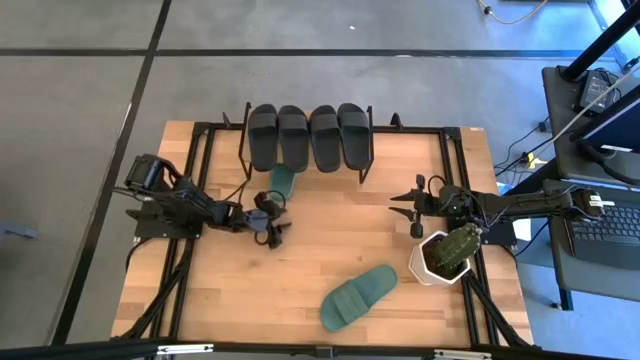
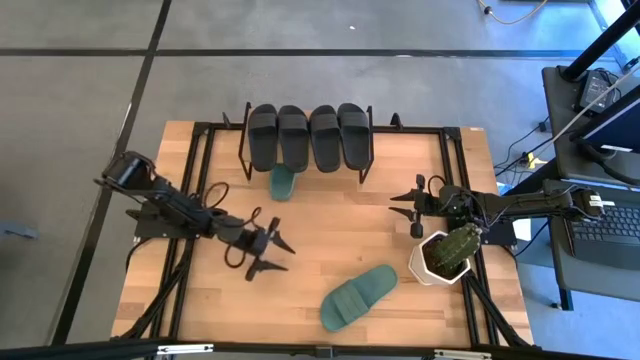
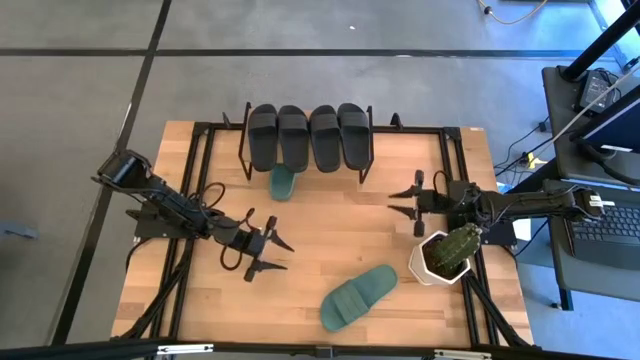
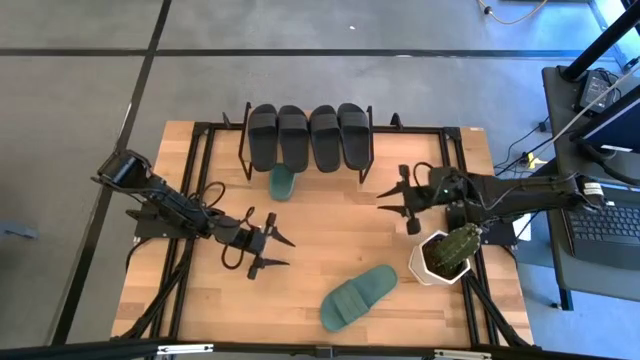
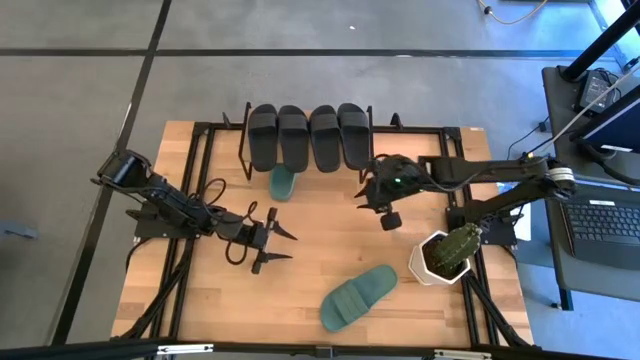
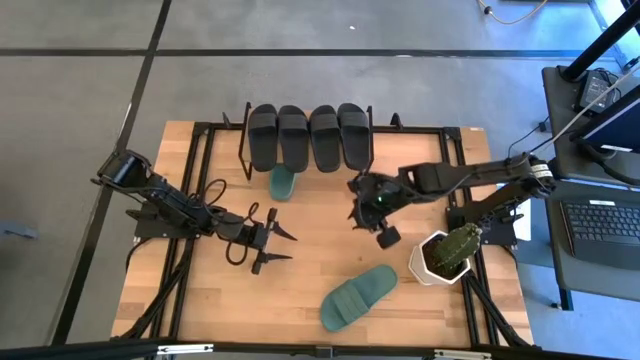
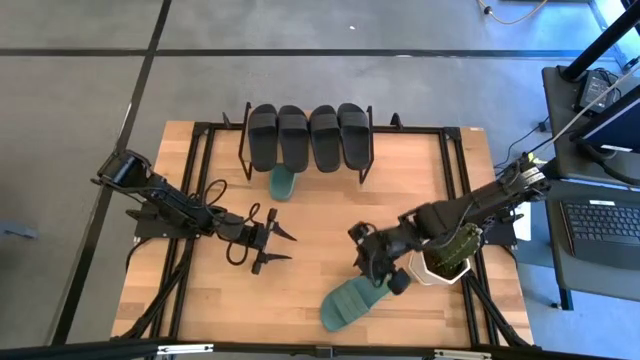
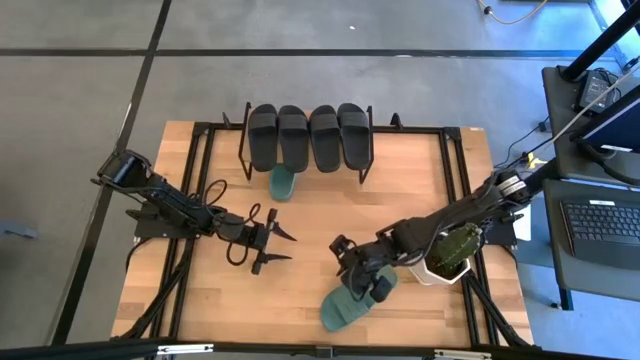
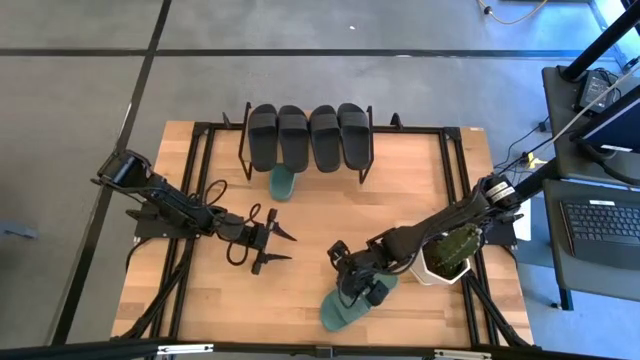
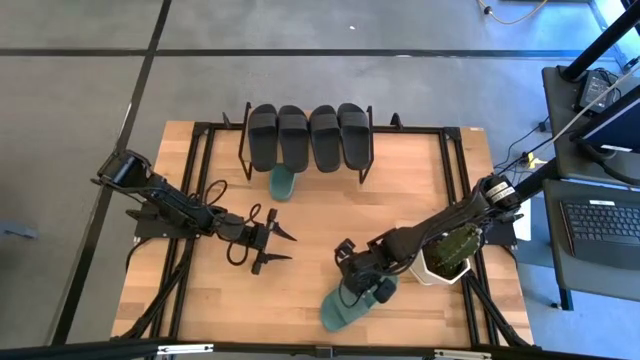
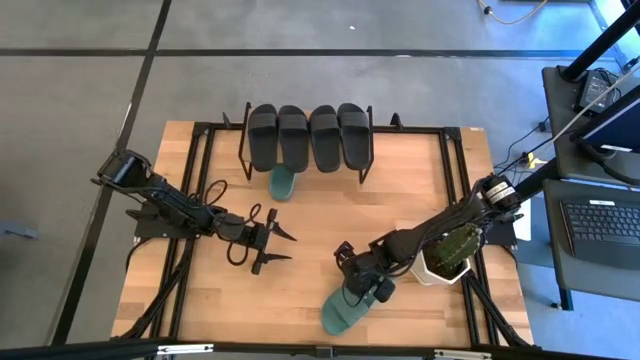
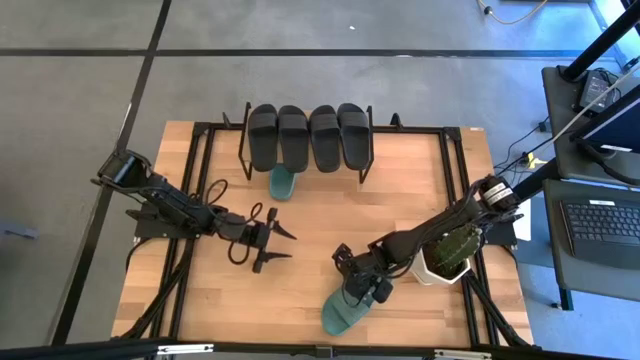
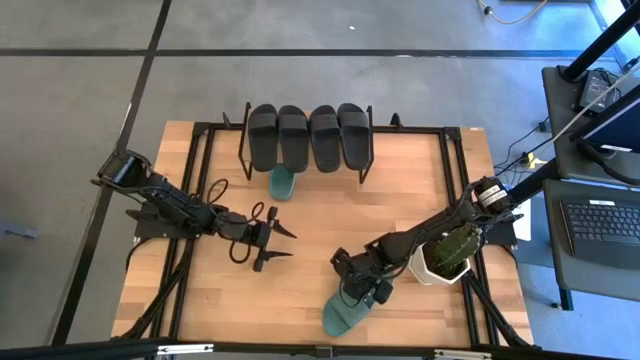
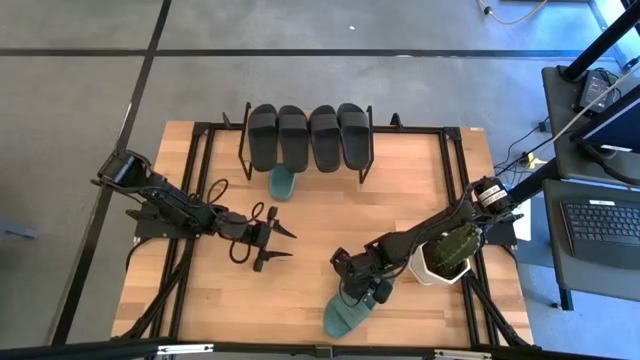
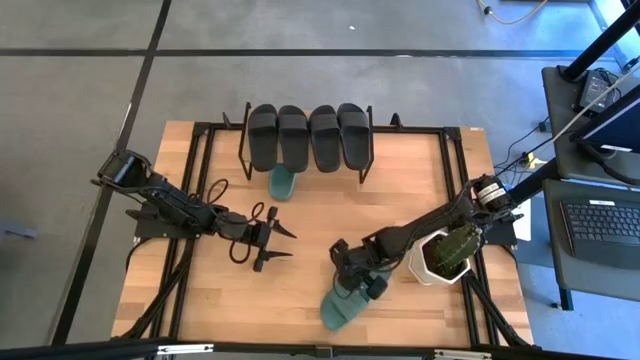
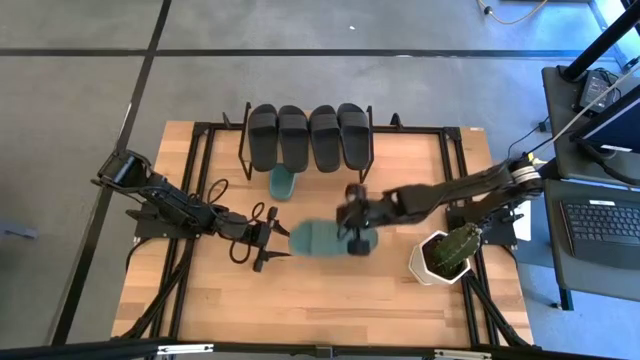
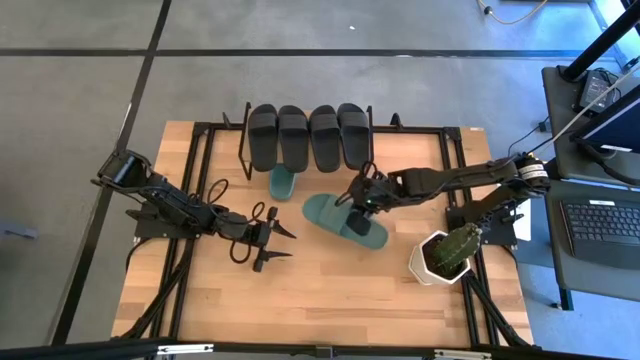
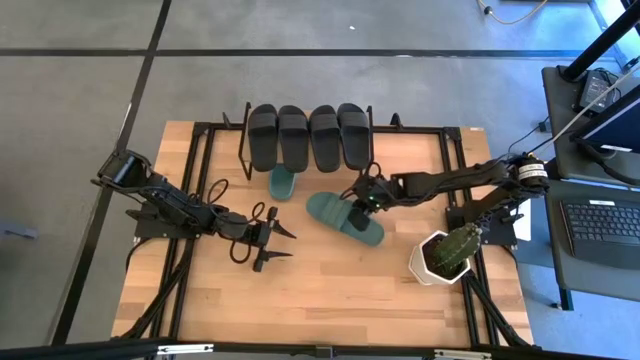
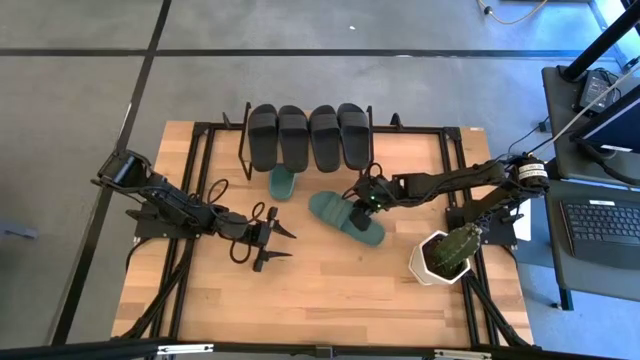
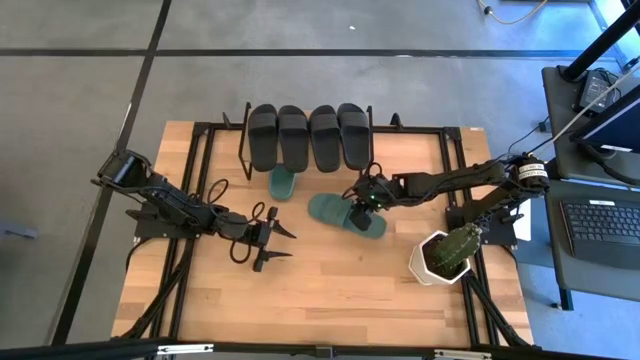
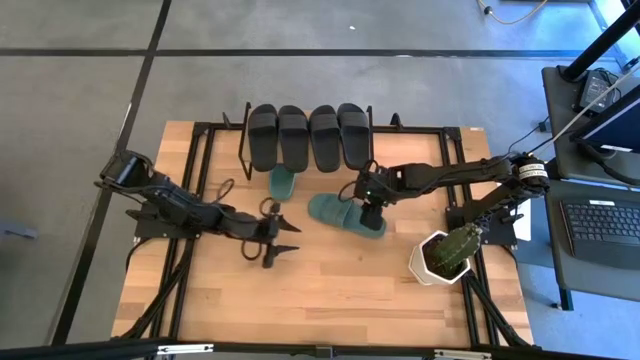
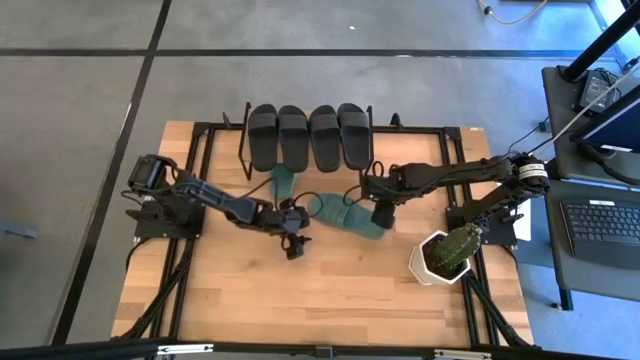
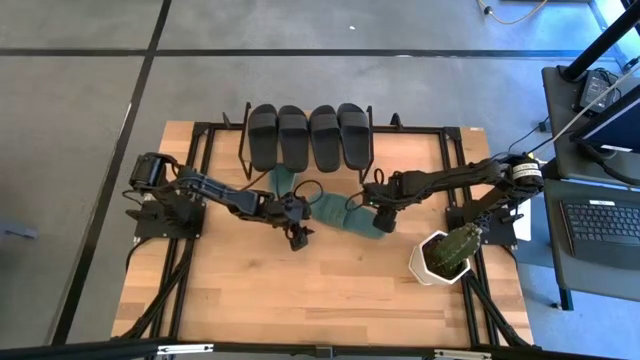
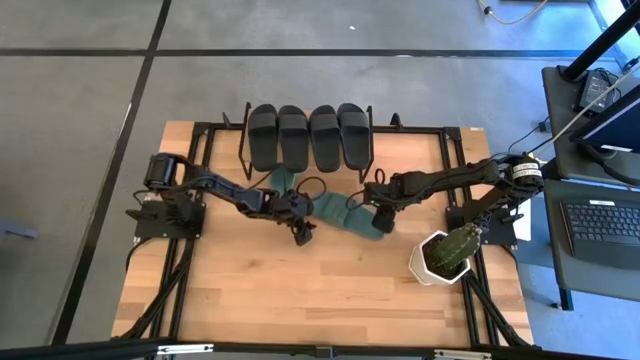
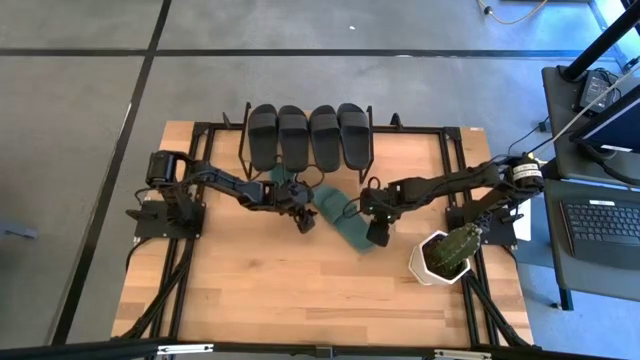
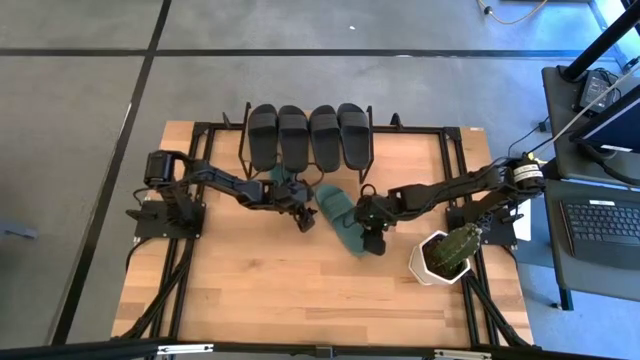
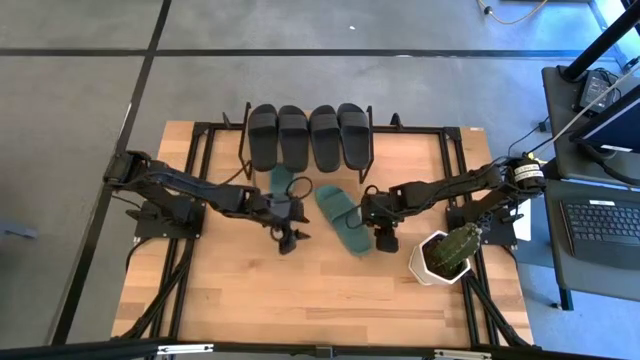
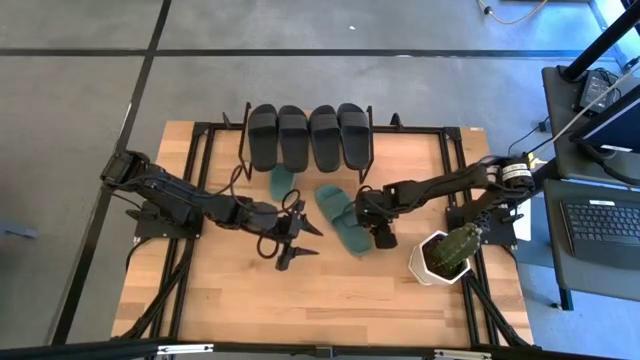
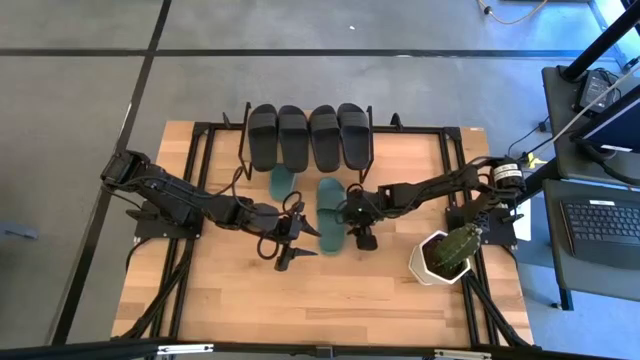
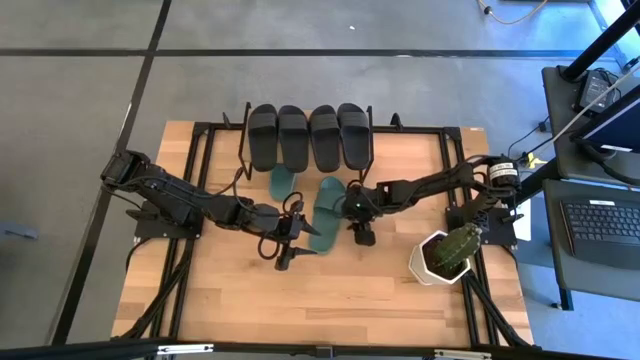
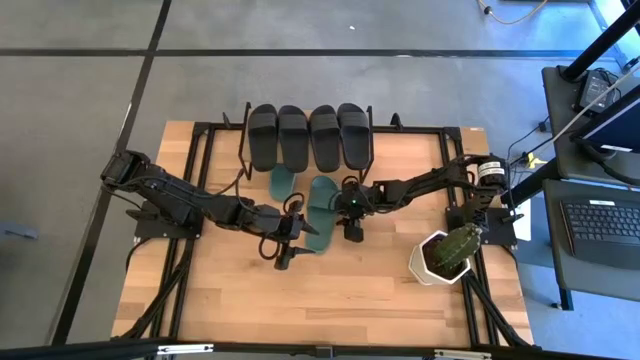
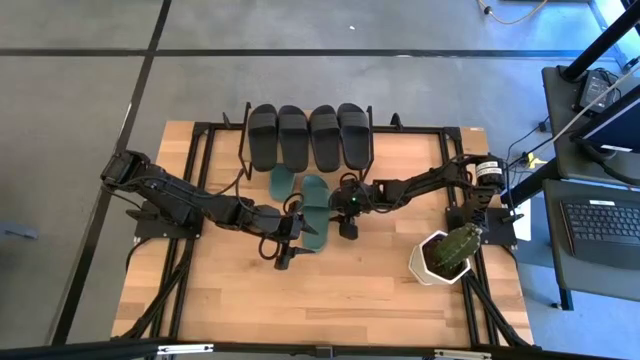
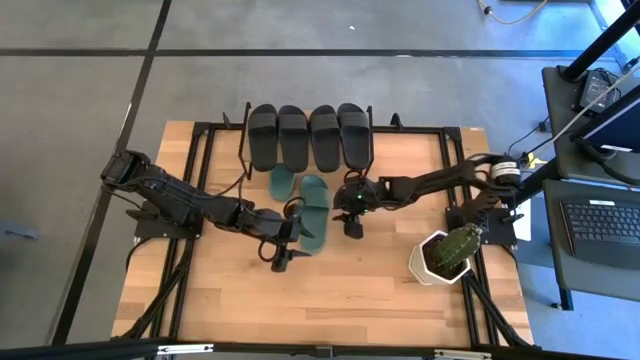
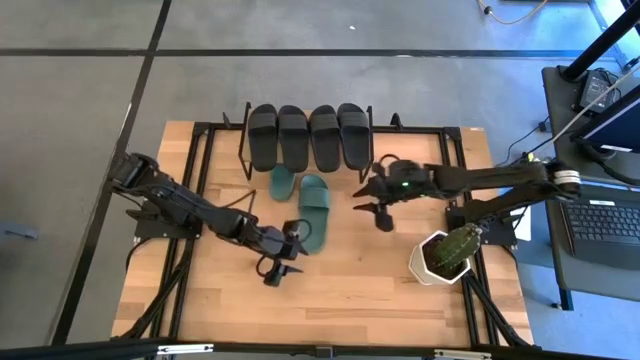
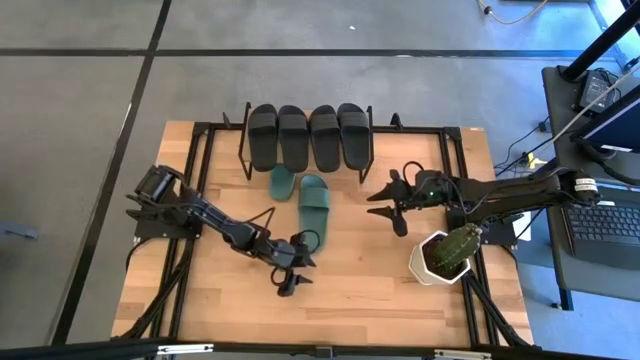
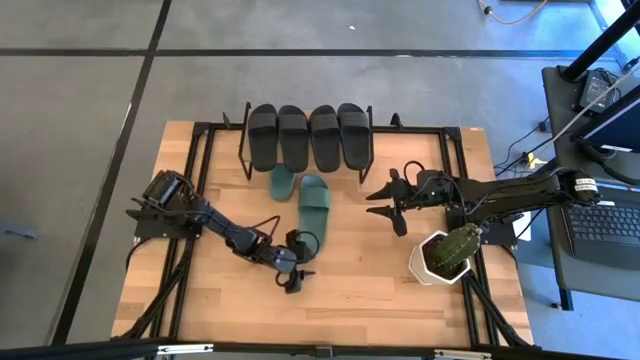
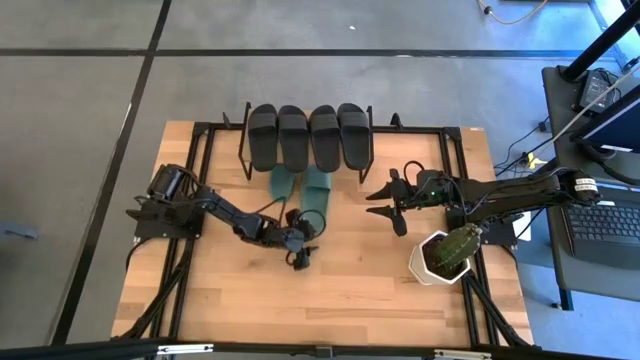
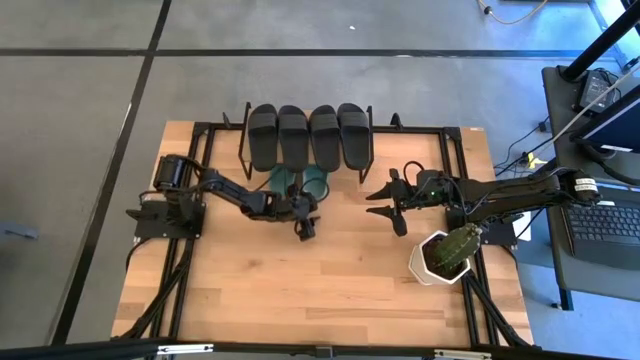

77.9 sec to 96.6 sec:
Task: Pick and place slides into the shelf
Put the green slide under the shelf
